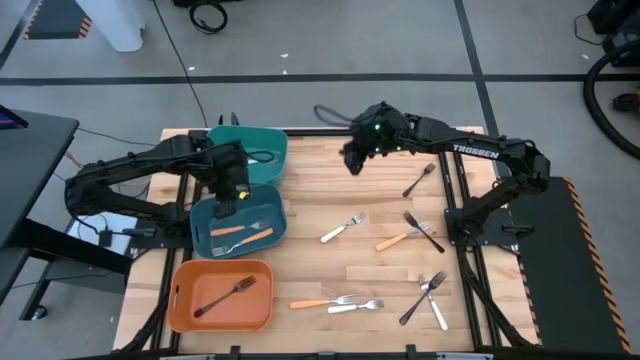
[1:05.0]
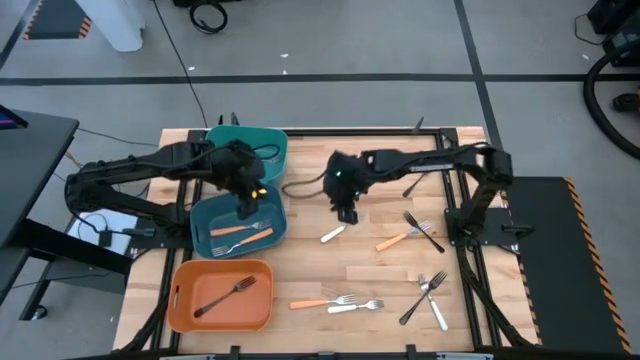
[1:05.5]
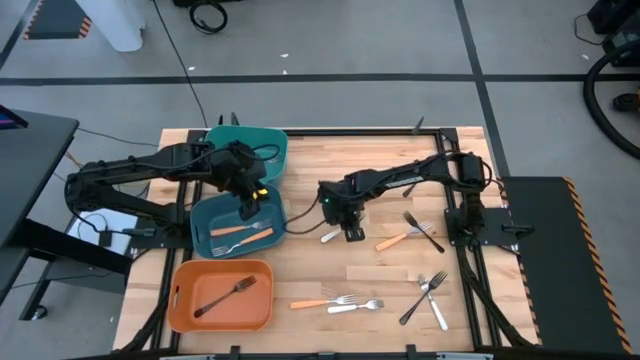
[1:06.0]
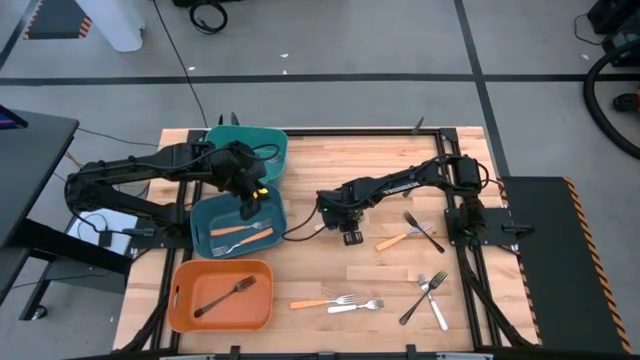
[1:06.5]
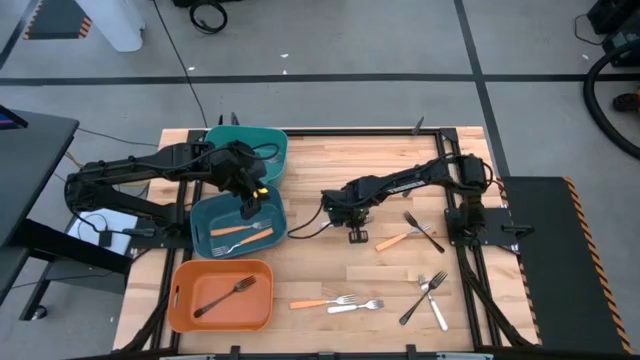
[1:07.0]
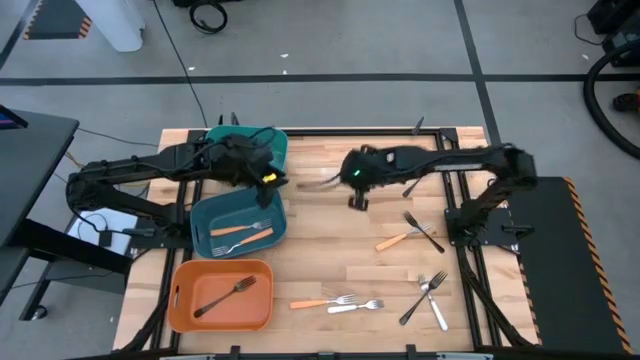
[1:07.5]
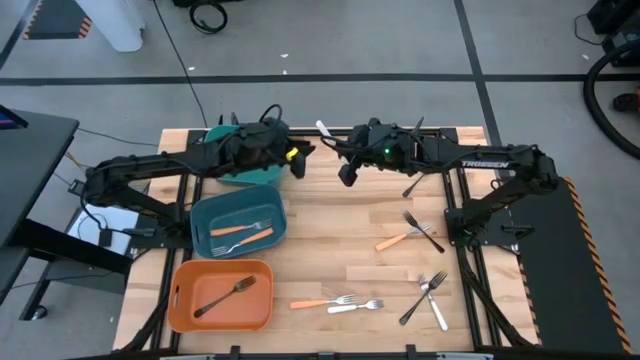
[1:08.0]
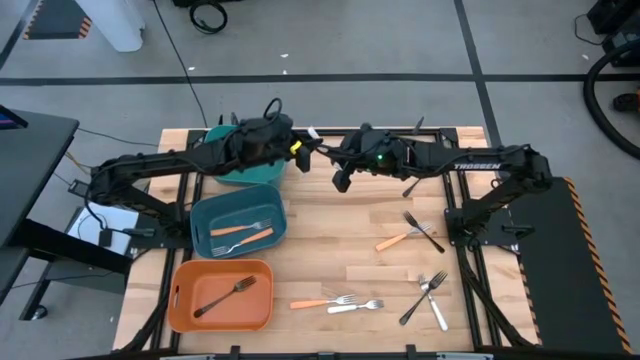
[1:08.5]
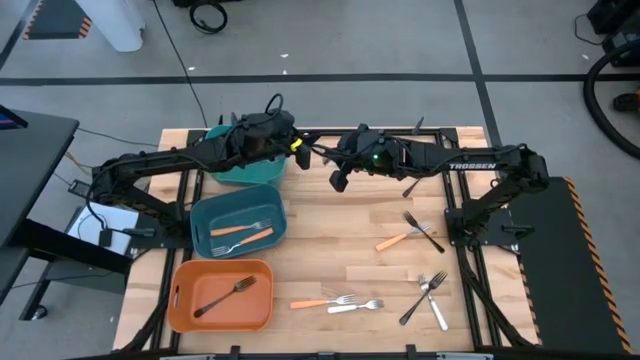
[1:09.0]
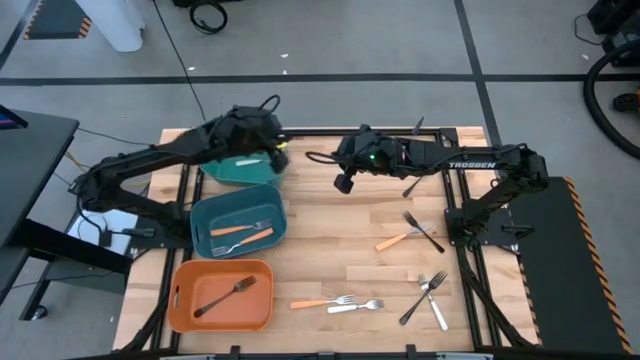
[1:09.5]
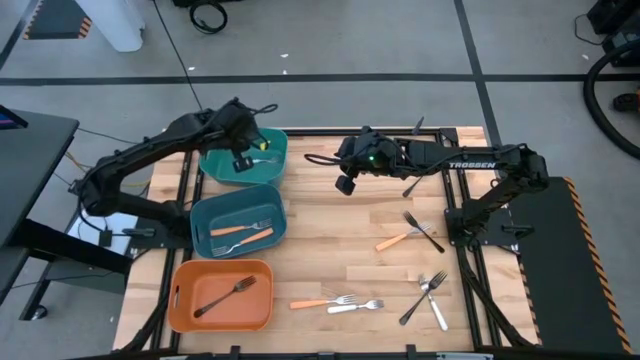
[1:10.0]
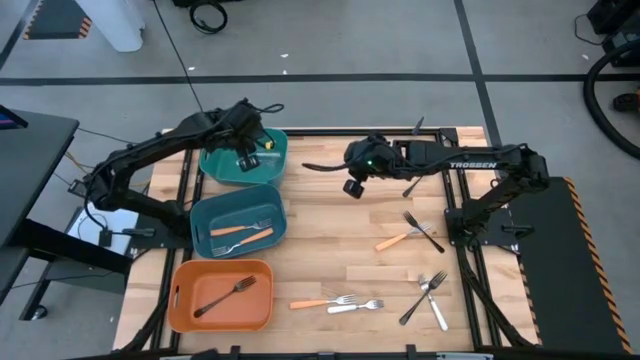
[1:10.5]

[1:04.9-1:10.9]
Task: Sort silverware by color (type)
Put the white fork into the green bin

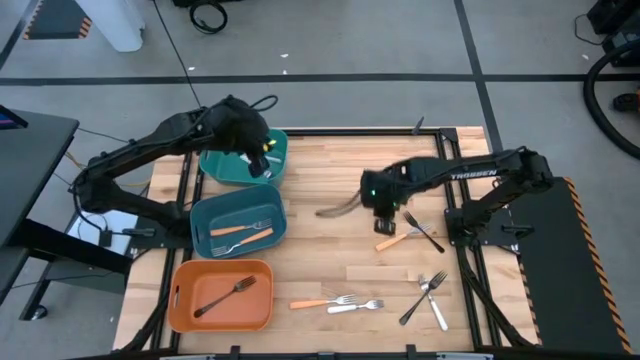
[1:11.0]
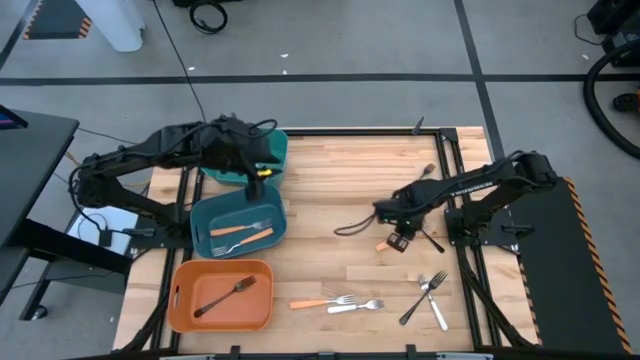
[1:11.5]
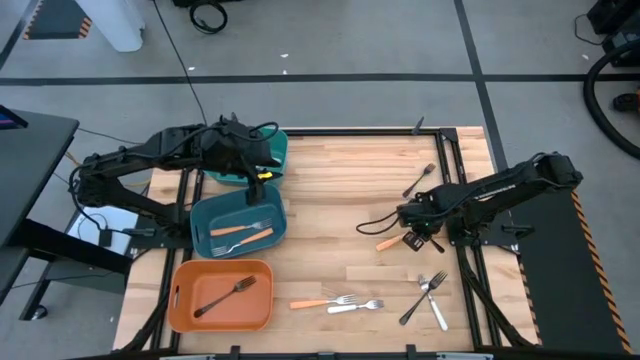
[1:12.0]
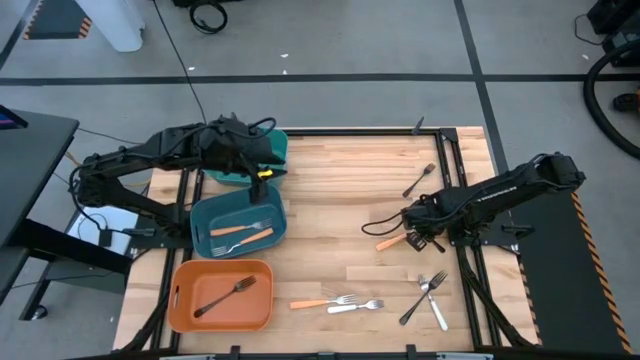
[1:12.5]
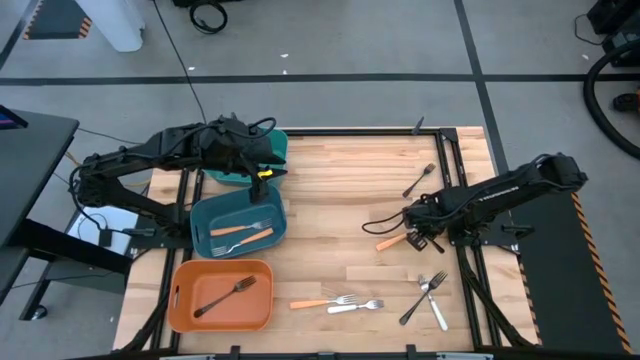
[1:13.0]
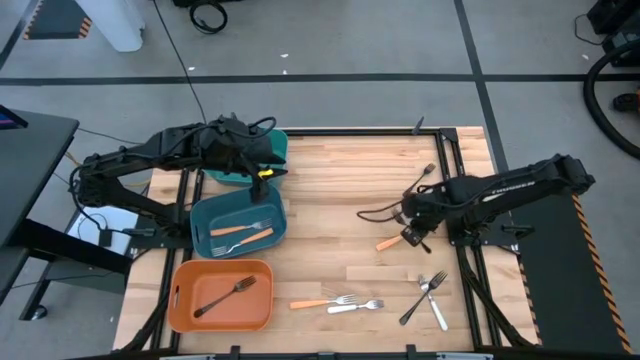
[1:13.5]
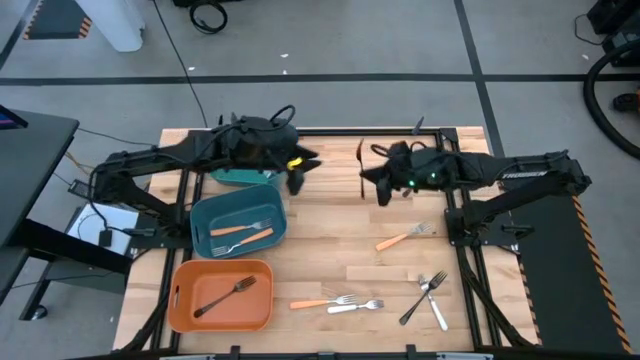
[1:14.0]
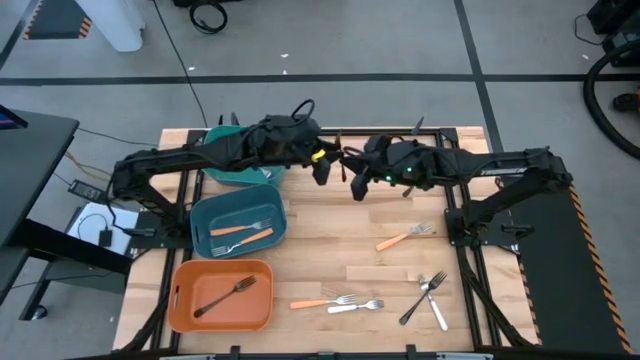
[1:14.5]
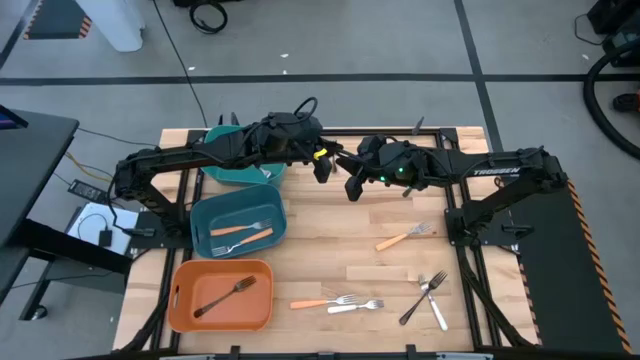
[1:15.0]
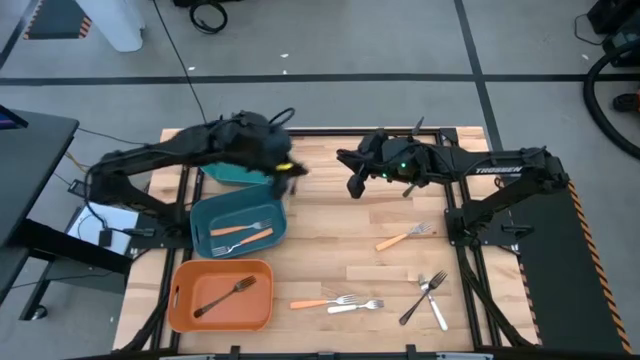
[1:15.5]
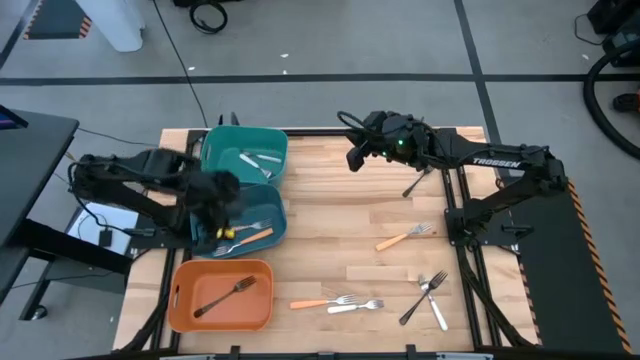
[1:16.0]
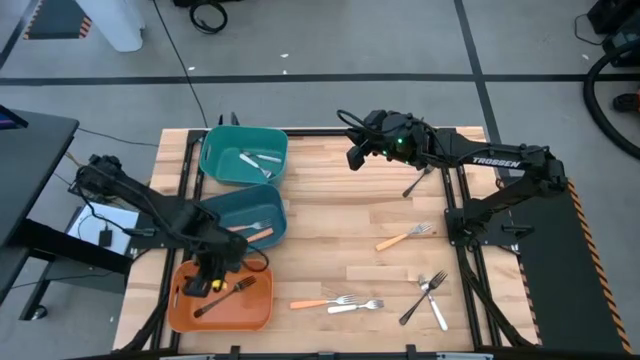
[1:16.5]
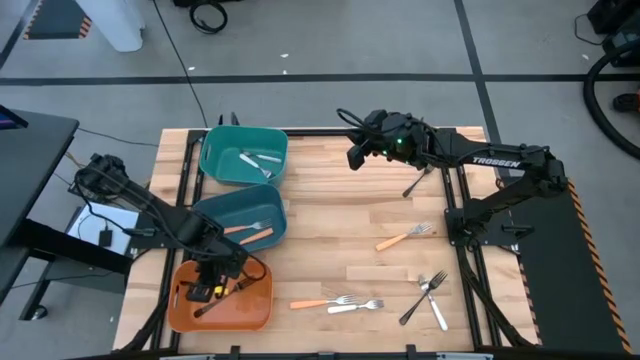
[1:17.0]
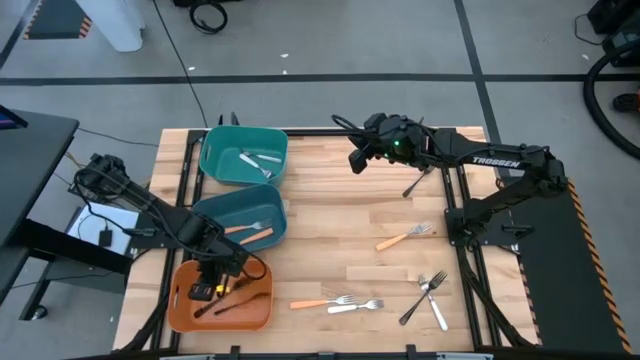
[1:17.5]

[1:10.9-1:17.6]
Put the black fork into the orange bin

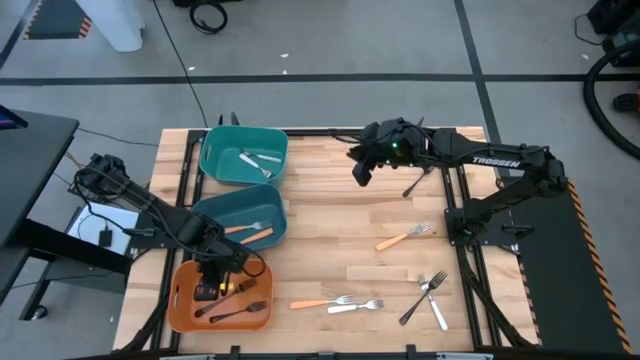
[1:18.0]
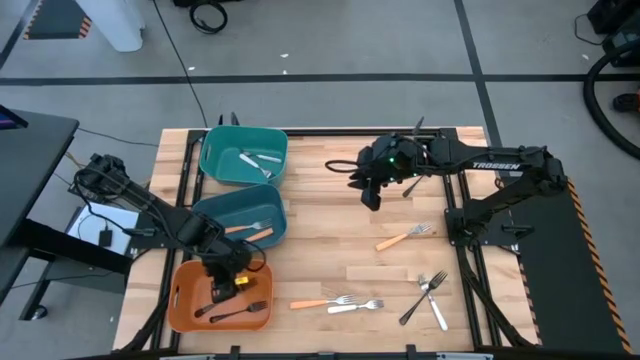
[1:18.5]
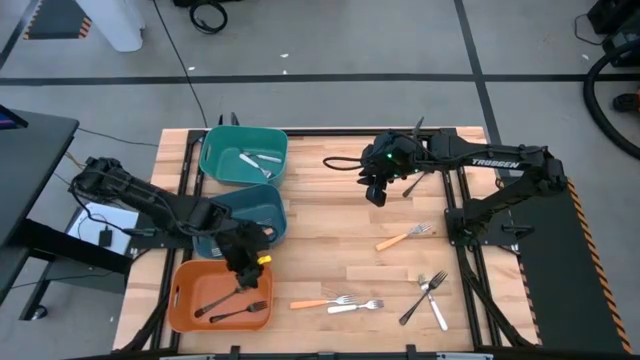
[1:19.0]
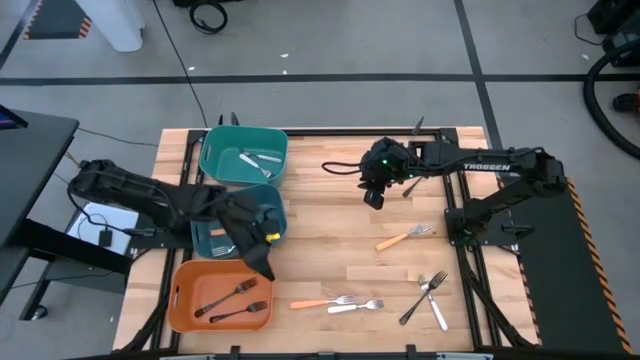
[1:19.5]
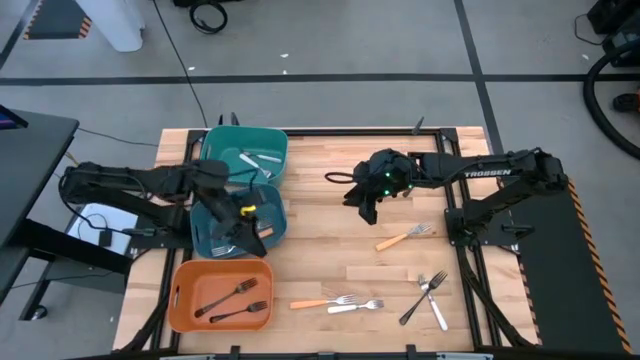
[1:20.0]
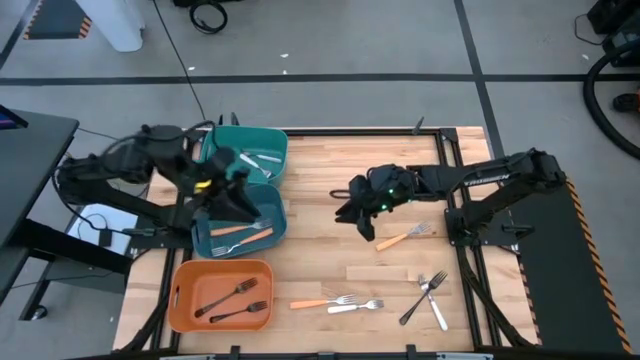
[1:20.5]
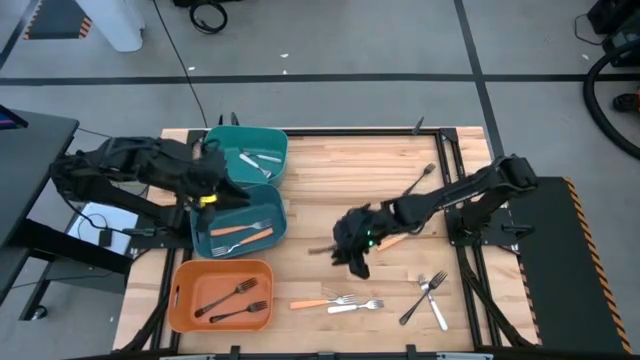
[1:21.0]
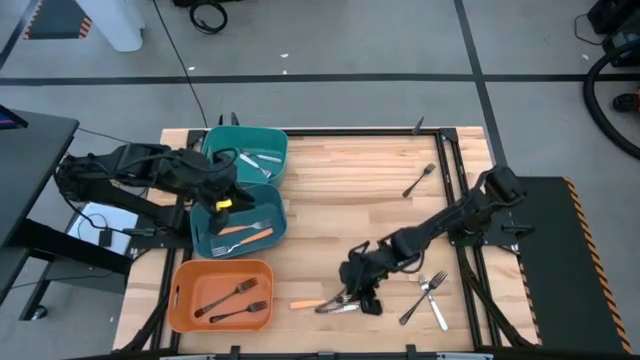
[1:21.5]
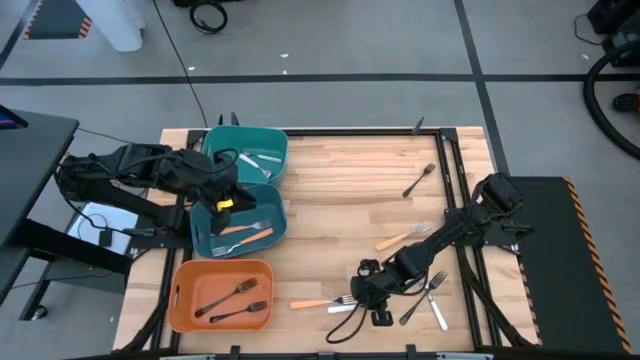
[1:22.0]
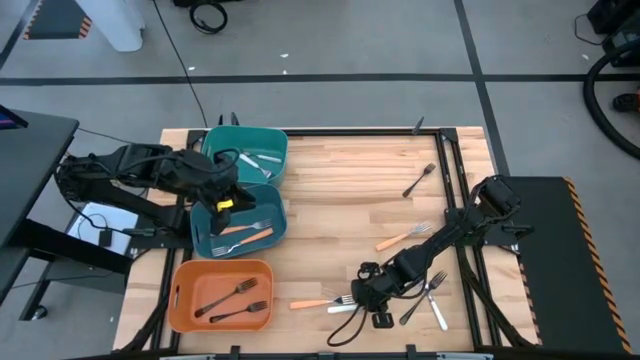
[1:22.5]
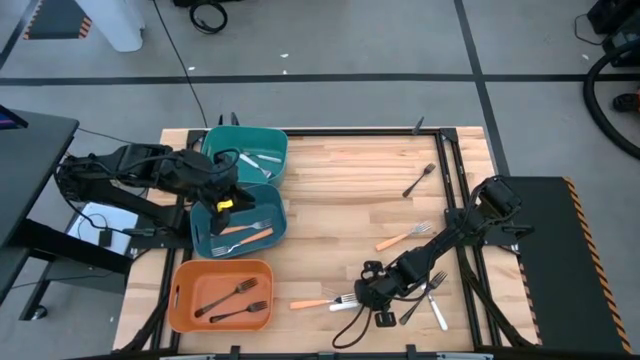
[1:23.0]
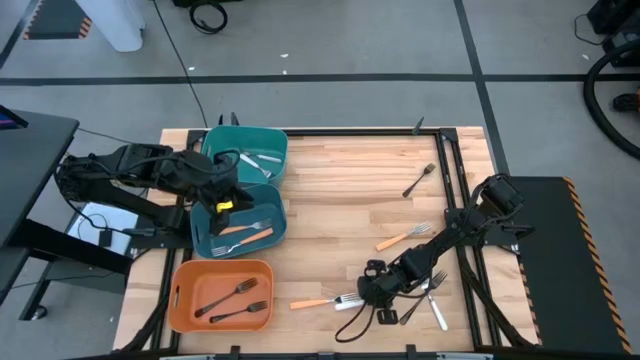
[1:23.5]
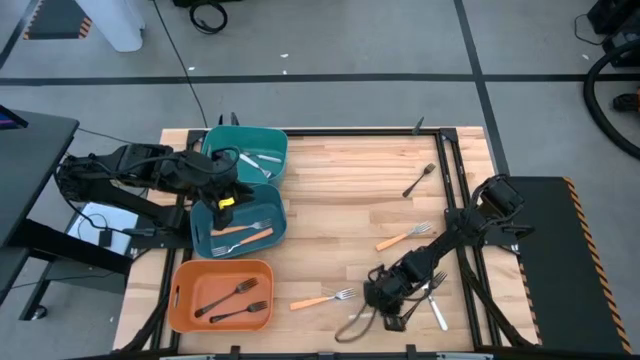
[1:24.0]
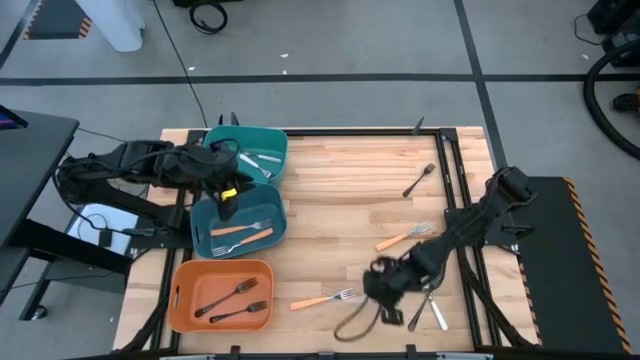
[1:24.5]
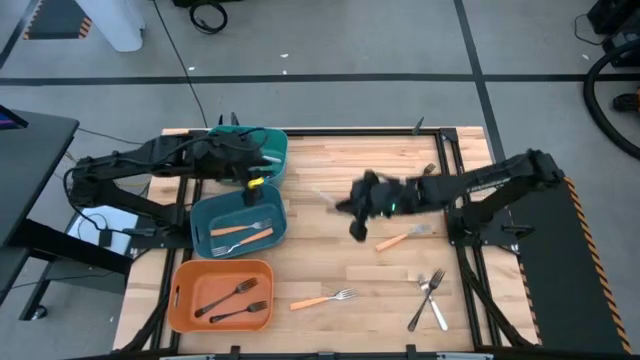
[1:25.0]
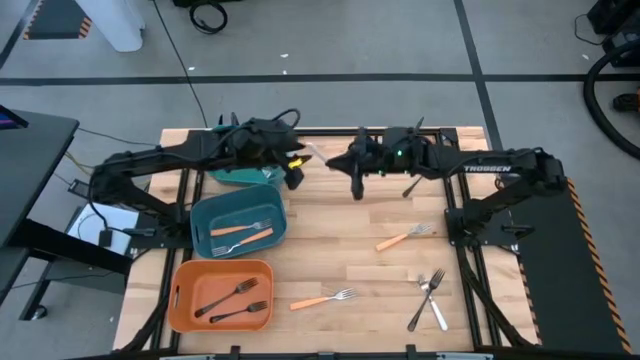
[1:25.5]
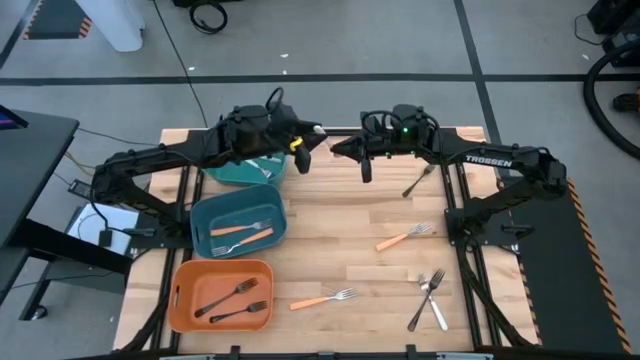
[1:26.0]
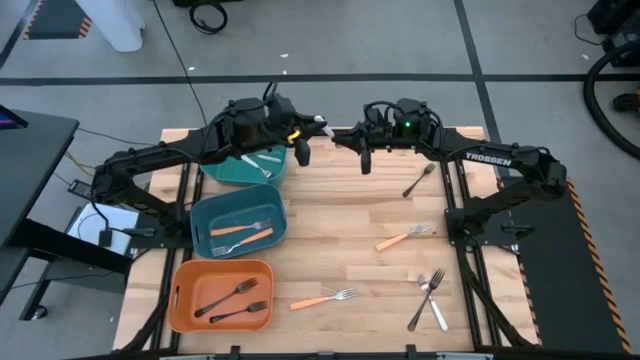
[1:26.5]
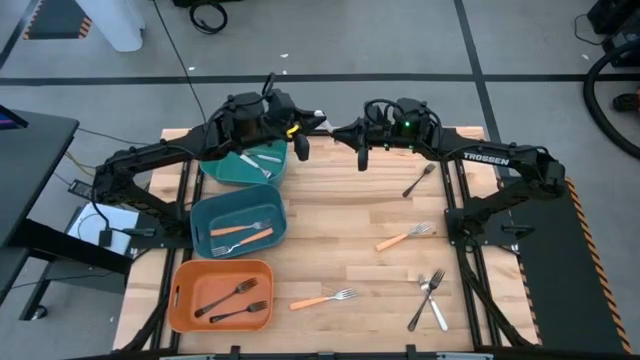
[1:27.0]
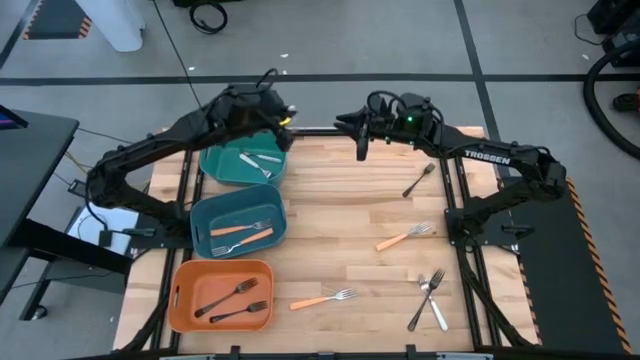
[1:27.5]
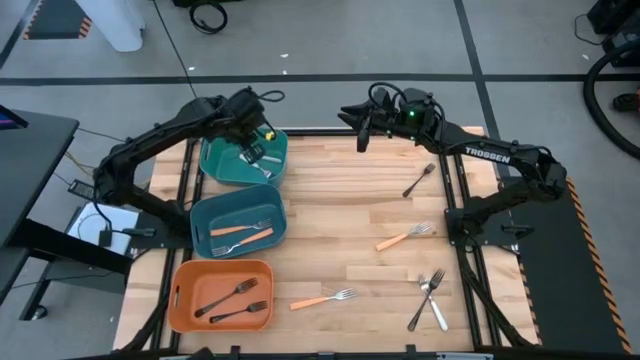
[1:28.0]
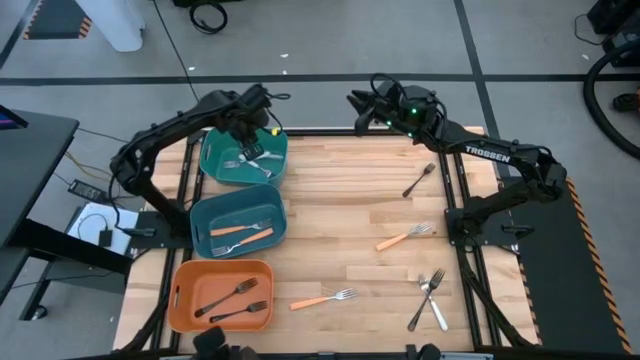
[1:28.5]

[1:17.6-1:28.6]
Put the white fork into the green bin
